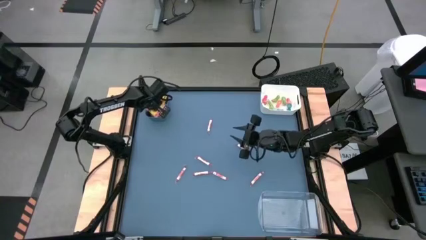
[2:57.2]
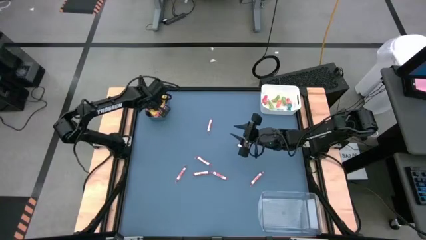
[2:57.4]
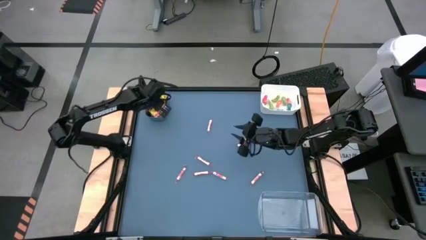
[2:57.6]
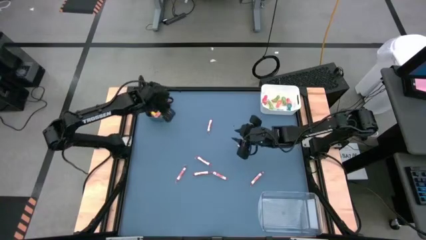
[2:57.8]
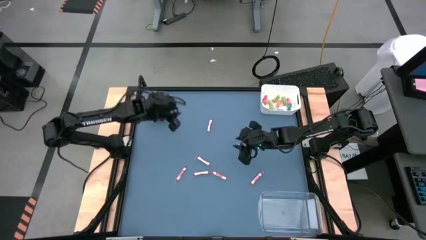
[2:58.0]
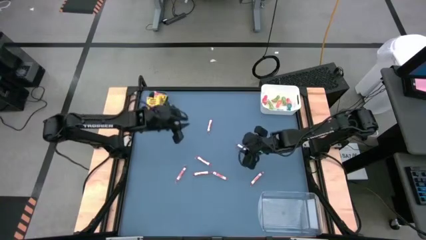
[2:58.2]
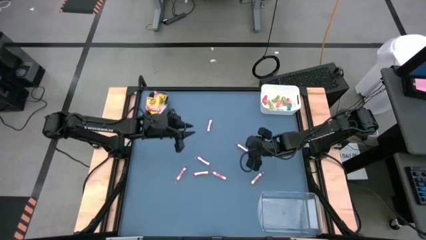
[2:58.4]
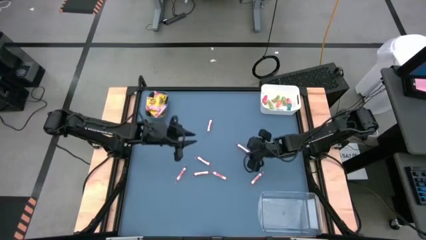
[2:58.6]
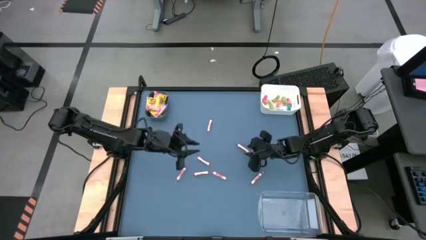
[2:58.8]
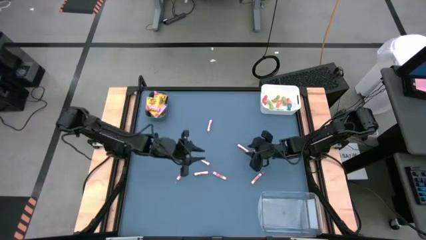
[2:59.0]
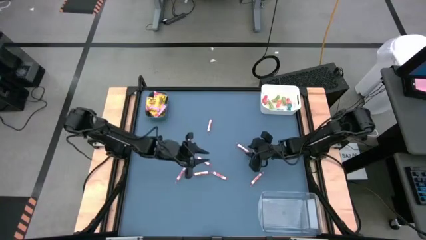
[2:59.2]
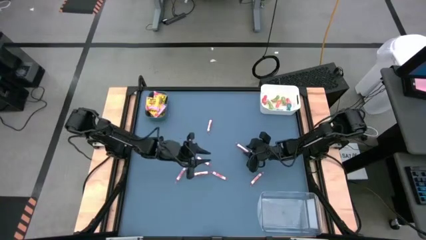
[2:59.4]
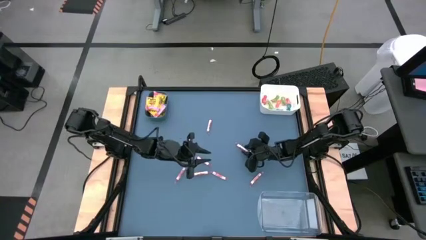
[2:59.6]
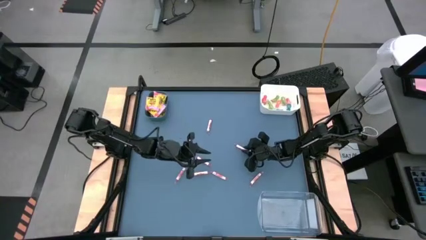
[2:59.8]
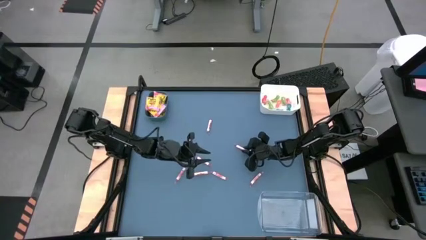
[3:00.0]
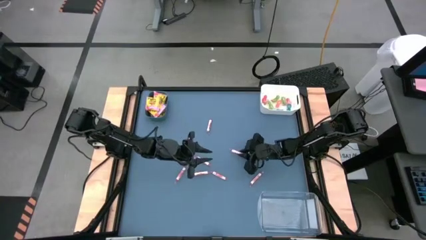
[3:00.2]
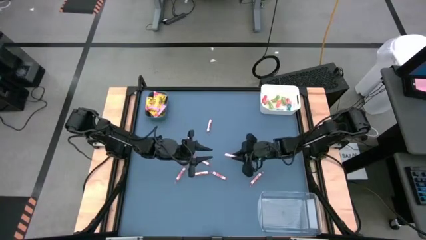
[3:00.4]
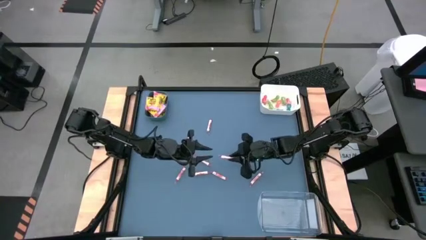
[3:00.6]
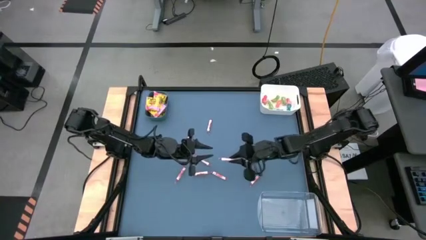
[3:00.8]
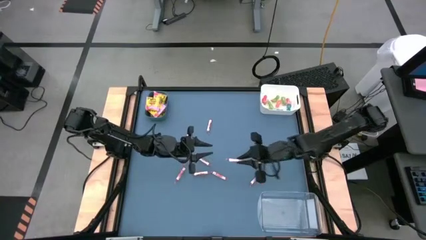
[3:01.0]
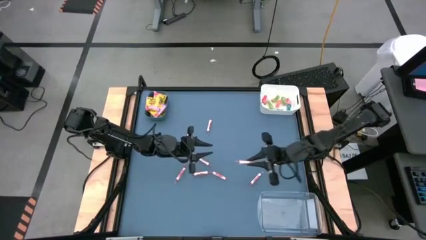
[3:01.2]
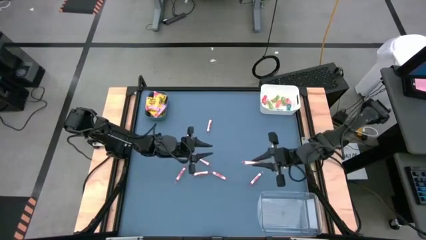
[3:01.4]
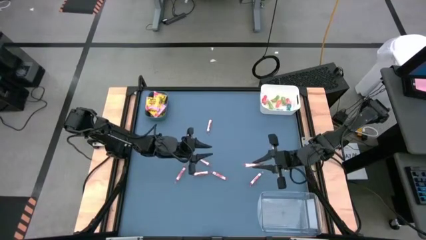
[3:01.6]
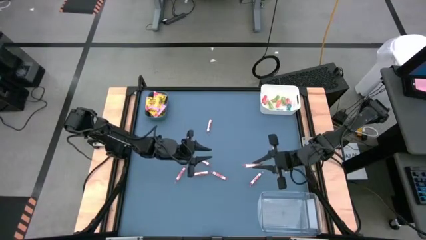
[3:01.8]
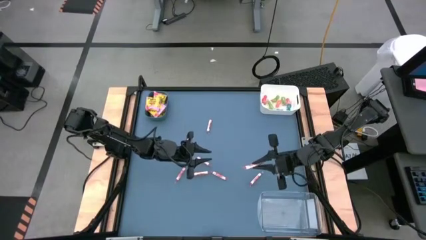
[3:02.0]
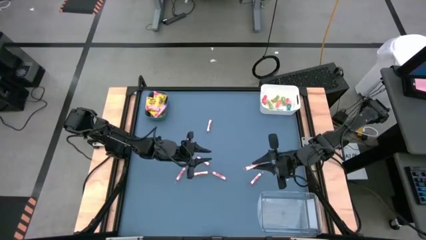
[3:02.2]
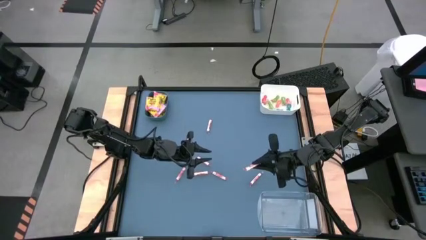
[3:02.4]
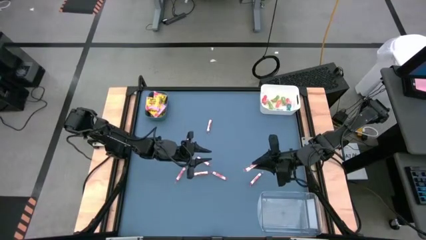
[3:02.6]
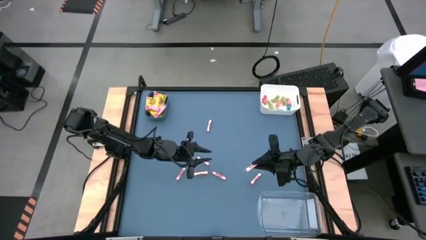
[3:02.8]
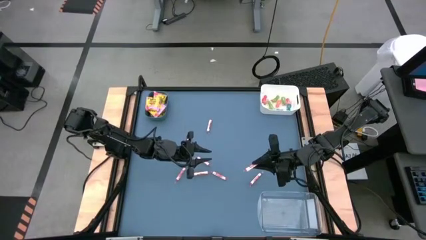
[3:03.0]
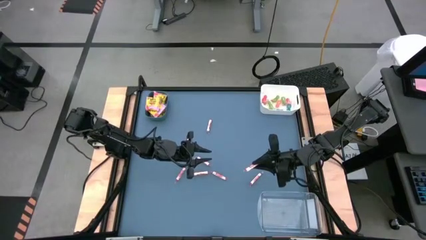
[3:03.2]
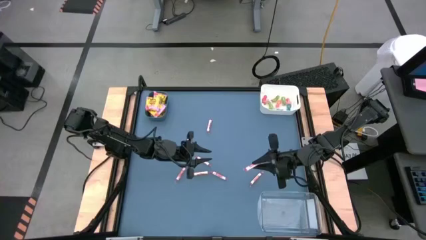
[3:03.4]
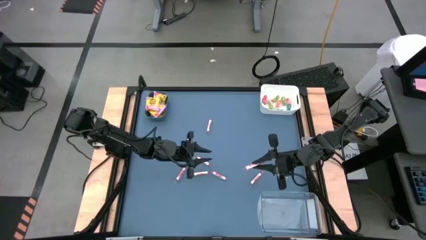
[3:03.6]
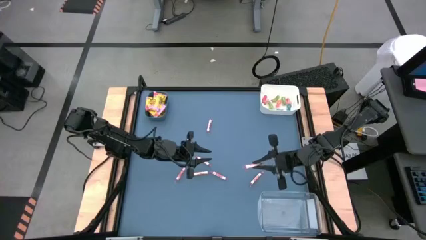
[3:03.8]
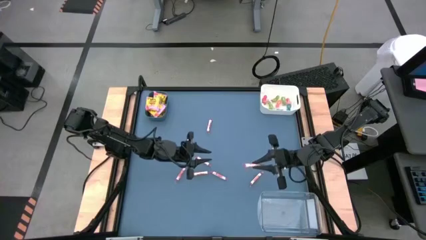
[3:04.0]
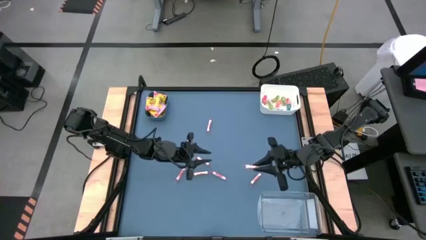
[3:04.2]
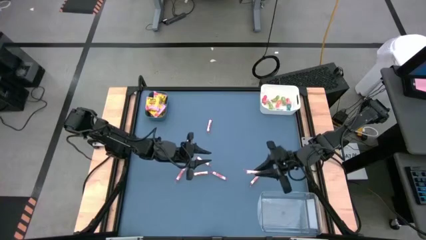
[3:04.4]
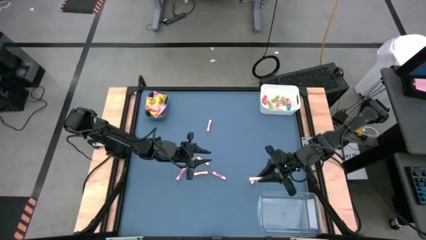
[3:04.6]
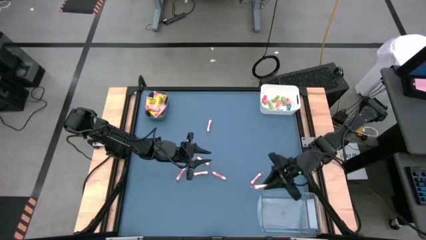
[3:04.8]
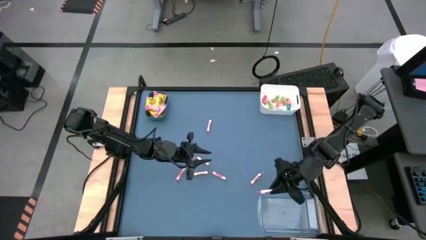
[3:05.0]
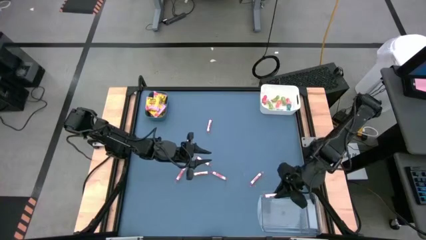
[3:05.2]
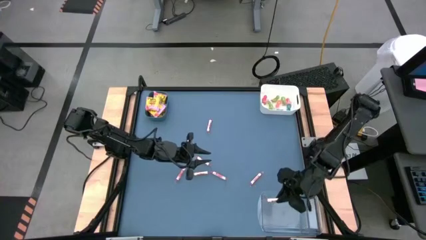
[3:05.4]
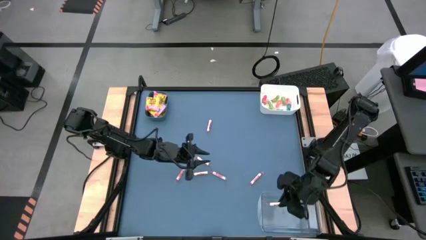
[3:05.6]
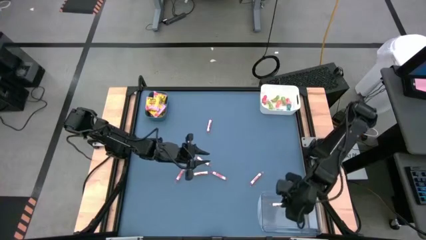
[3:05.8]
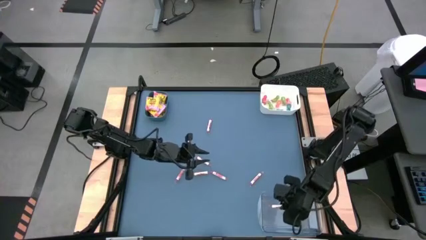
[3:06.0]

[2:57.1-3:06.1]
Task: Sort candy
Put the white candy into the transparent bin

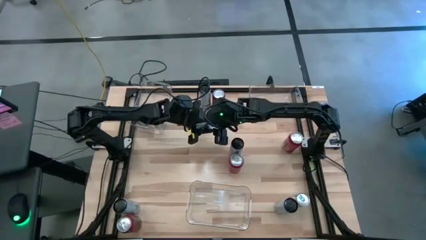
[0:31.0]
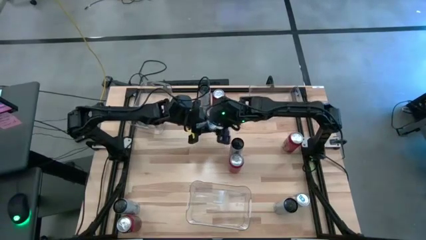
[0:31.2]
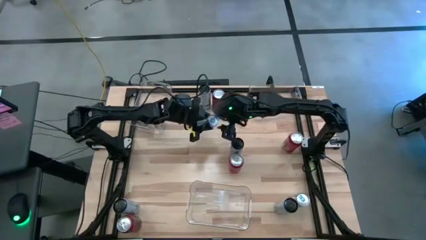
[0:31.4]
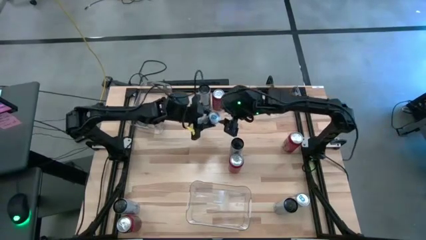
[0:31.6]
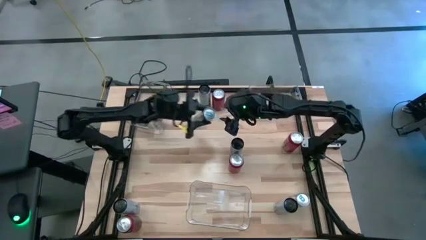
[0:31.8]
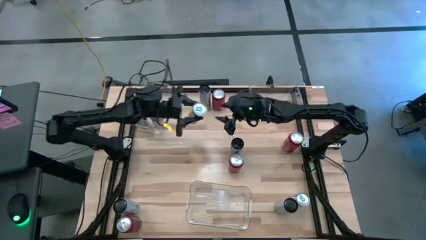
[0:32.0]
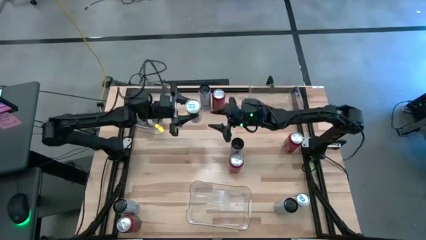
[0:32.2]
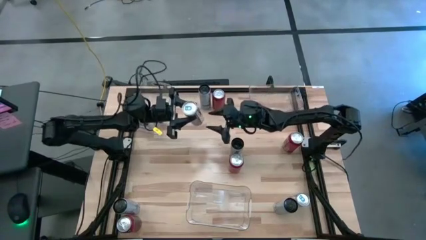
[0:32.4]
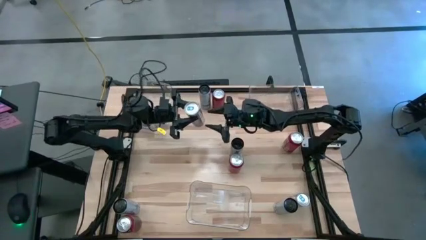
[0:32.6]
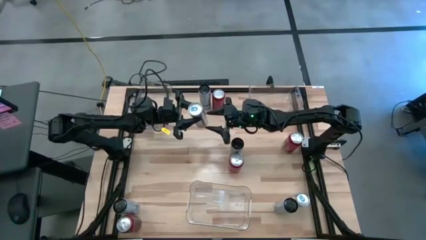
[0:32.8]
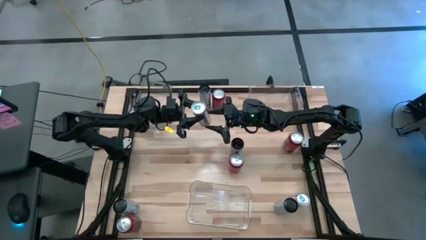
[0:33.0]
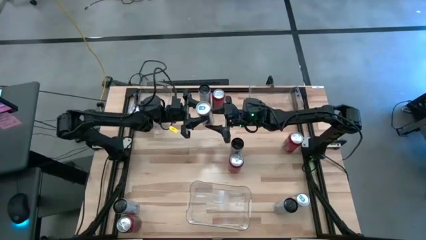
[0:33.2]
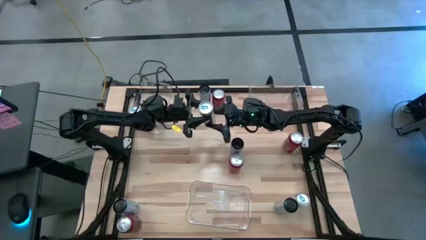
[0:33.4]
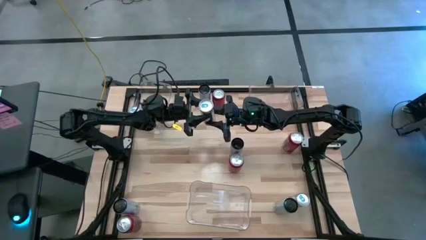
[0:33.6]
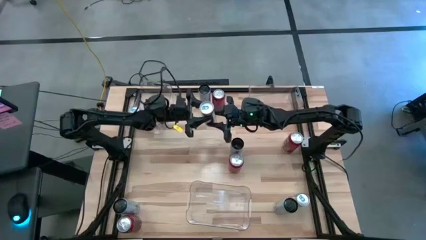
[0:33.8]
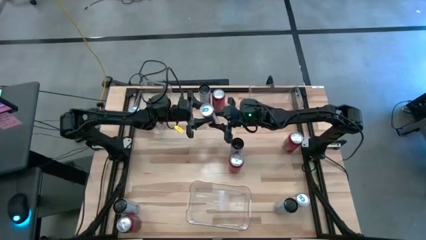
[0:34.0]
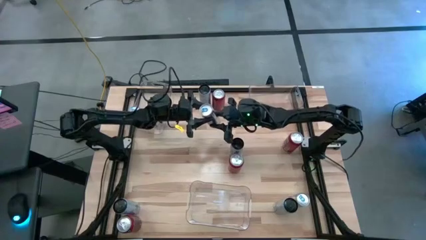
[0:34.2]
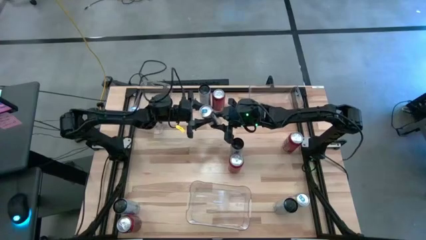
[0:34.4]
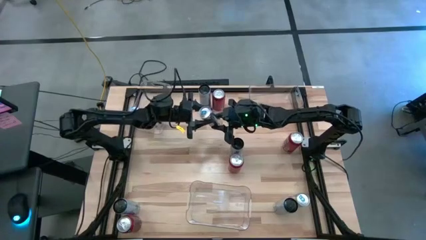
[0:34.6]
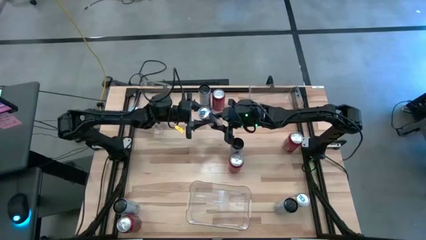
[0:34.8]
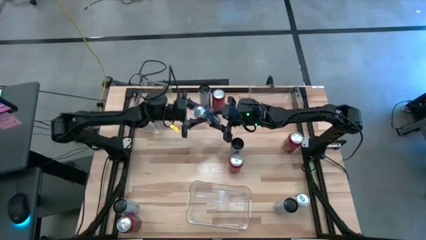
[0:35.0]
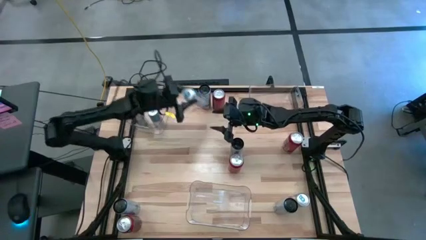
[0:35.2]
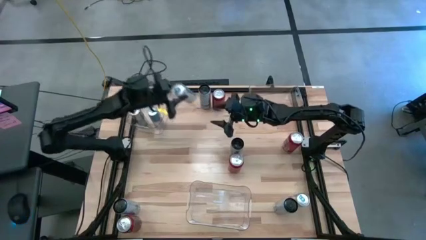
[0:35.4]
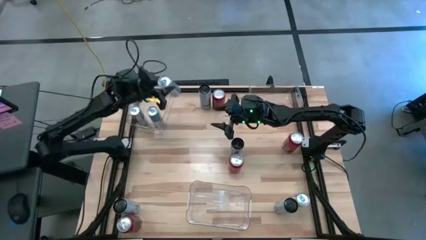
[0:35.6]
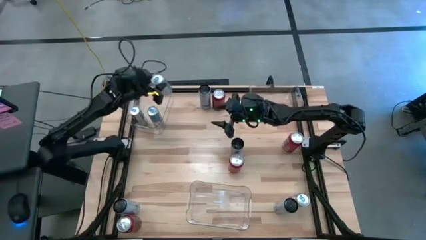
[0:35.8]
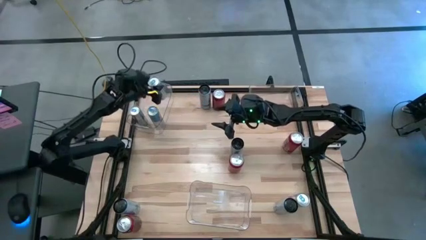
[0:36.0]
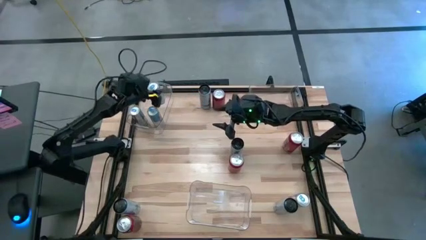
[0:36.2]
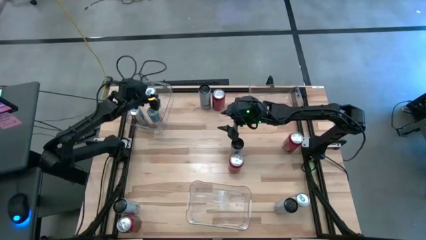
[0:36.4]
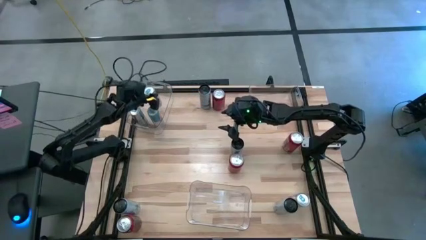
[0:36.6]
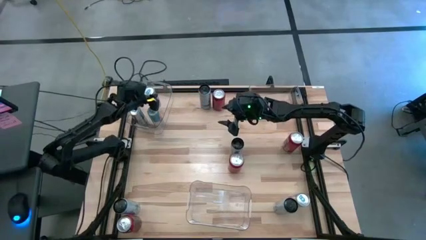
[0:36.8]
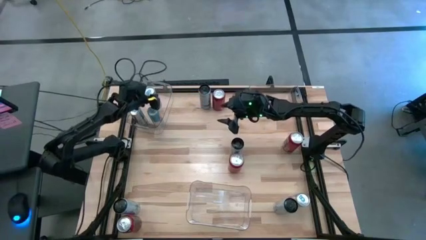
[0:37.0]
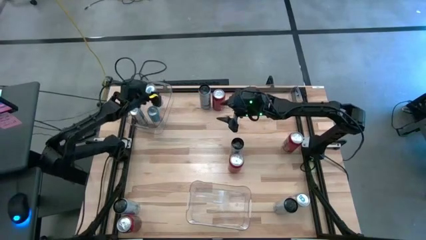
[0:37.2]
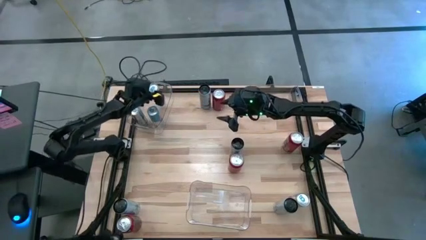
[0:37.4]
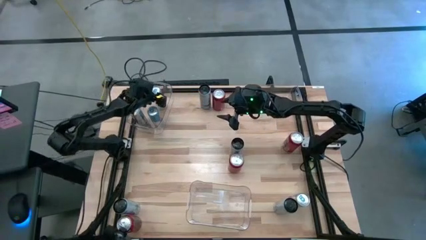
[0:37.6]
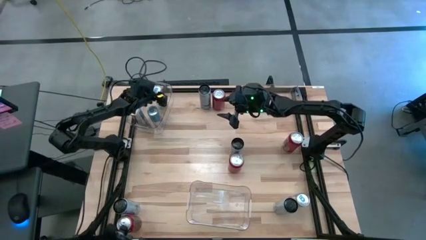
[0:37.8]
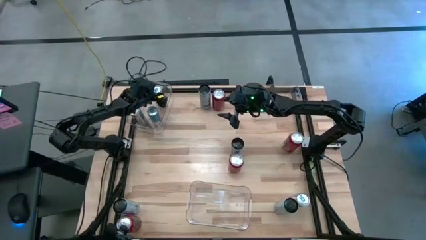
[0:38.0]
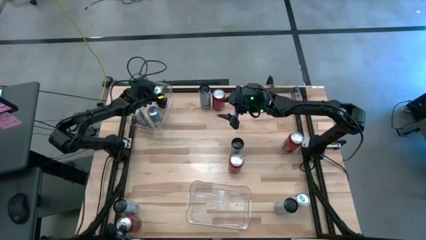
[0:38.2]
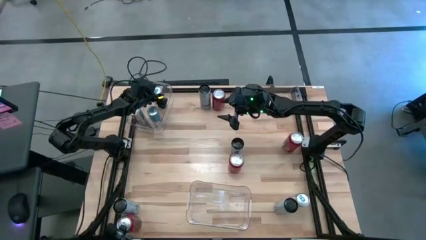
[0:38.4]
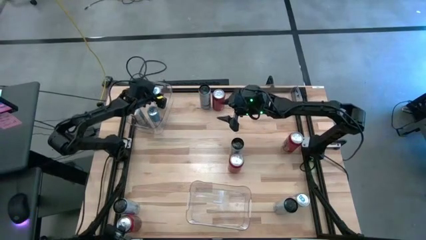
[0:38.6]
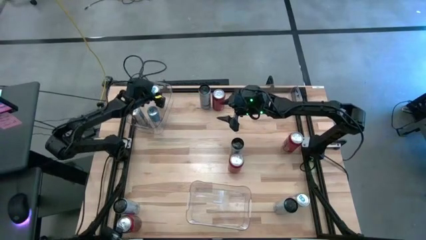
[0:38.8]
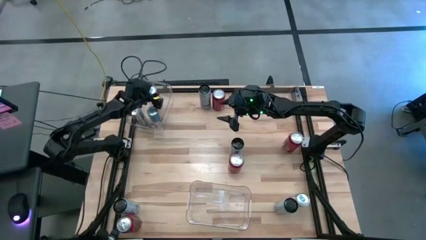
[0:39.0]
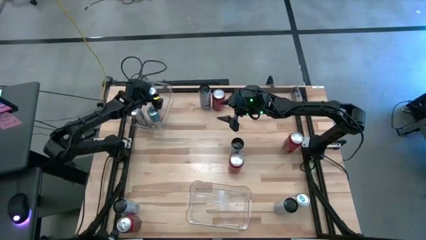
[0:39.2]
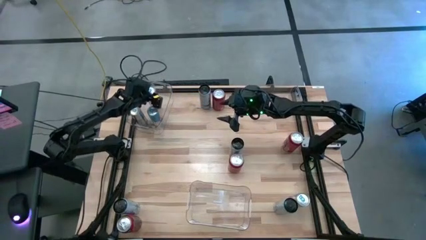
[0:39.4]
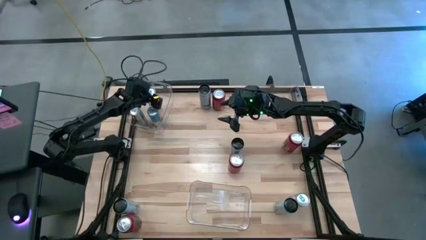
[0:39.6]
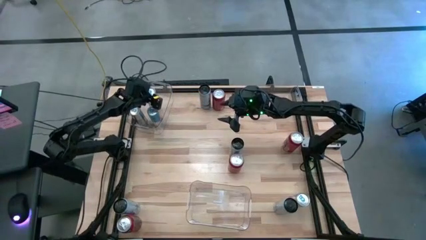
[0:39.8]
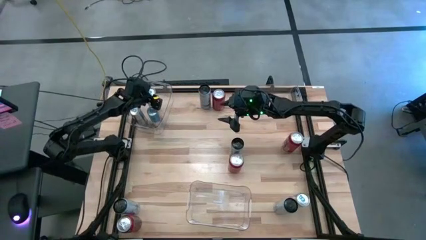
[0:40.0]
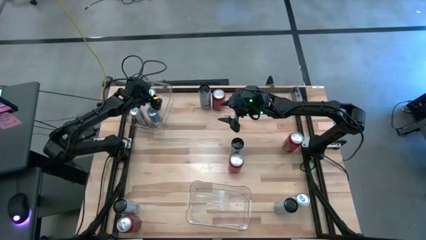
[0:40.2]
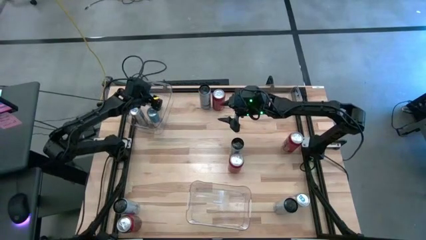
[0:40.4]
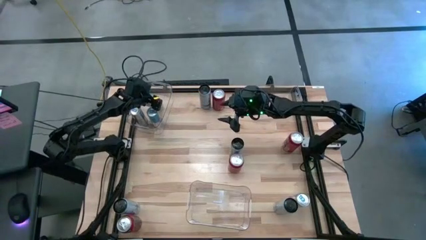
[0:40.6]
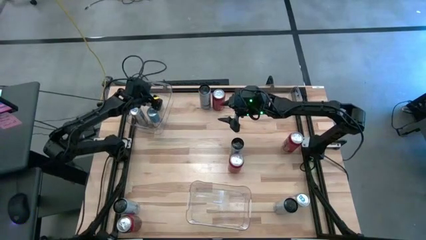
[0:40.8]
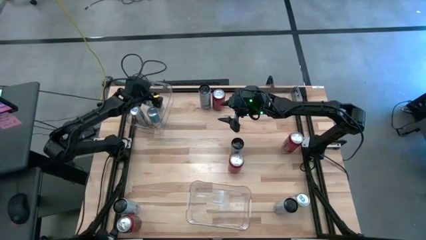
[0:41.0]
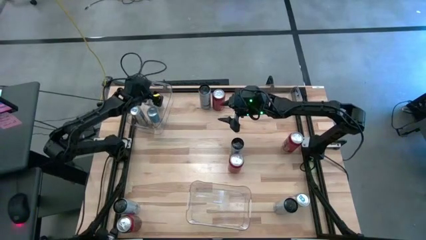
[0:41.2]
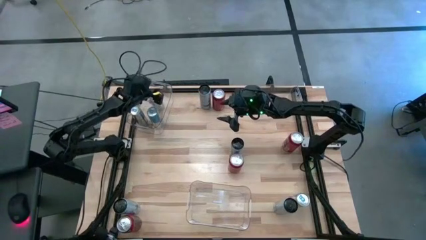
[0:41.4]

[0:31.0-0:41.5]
Task: Sort soda cans
Put the blue soda can into the top left transparent bin
